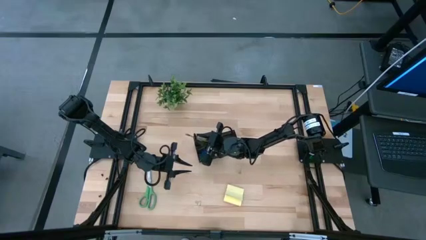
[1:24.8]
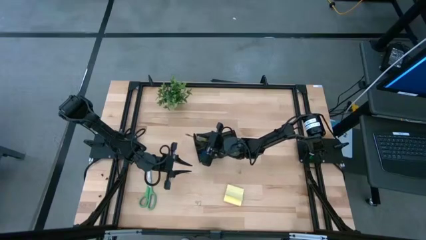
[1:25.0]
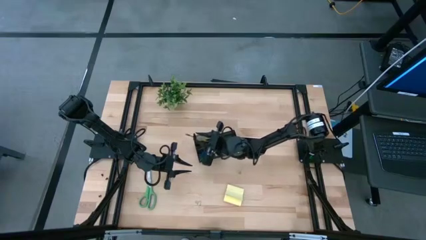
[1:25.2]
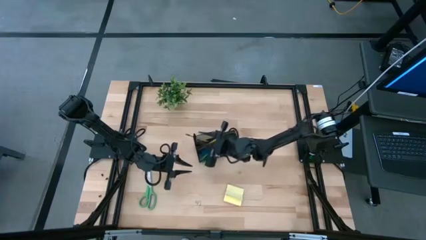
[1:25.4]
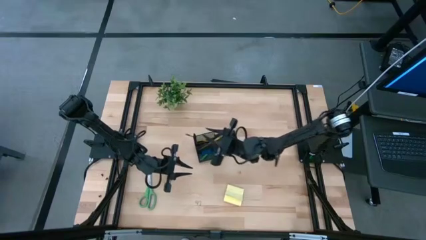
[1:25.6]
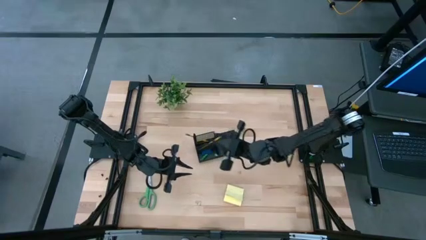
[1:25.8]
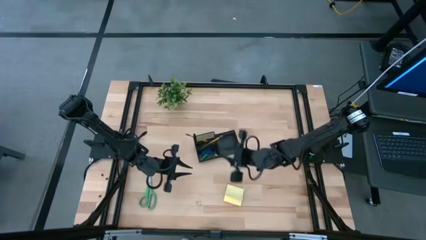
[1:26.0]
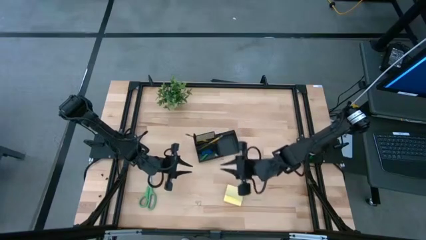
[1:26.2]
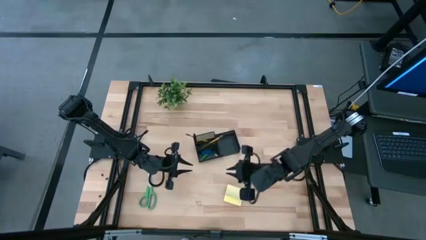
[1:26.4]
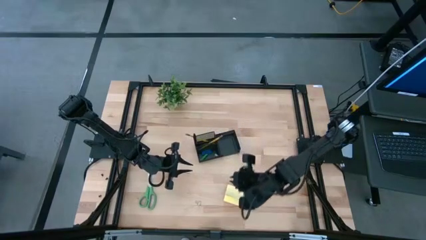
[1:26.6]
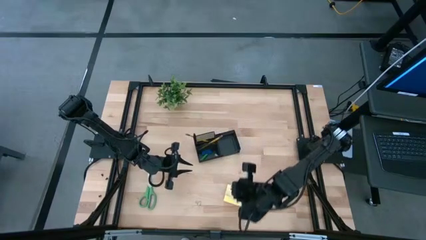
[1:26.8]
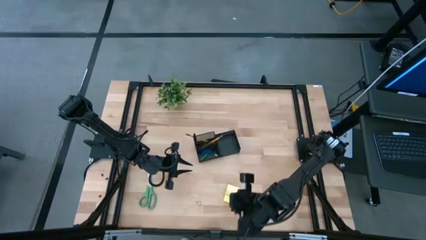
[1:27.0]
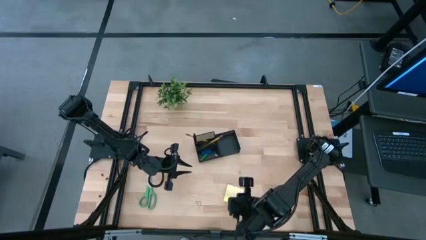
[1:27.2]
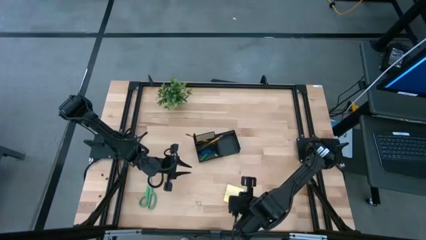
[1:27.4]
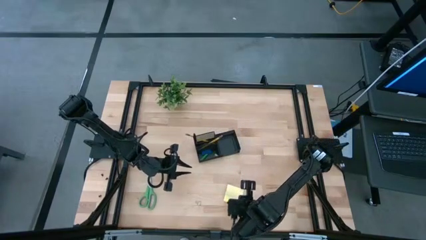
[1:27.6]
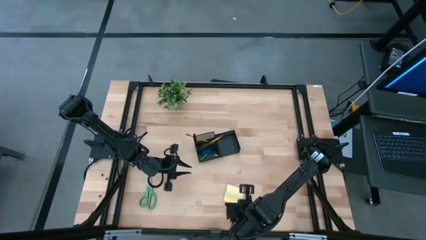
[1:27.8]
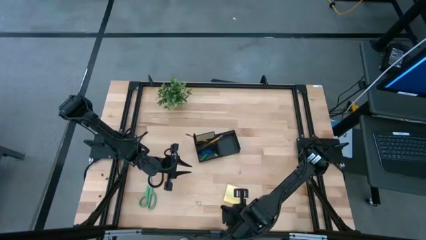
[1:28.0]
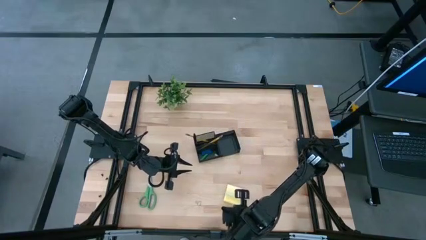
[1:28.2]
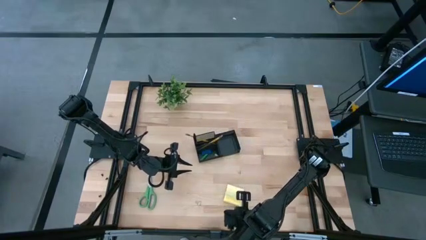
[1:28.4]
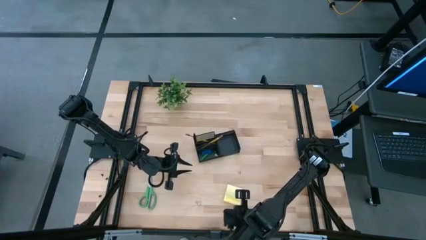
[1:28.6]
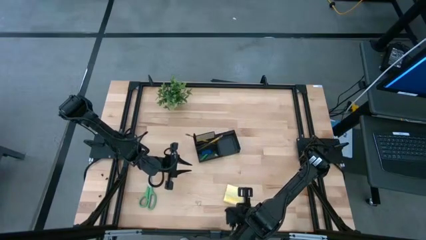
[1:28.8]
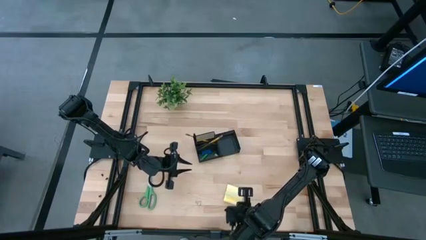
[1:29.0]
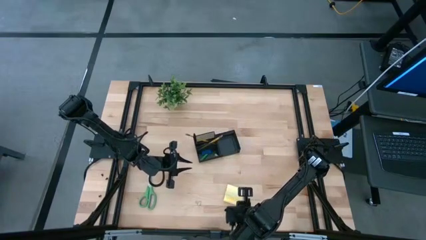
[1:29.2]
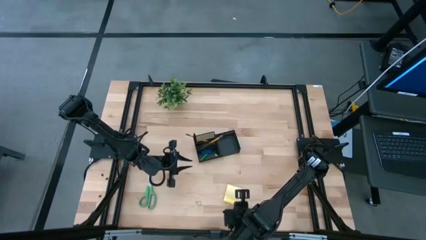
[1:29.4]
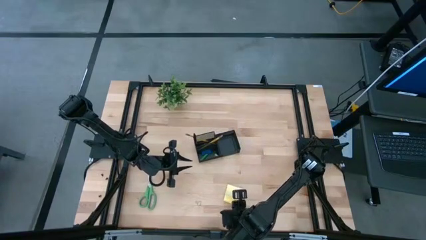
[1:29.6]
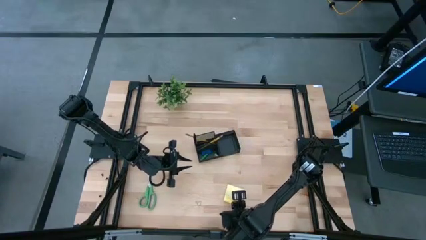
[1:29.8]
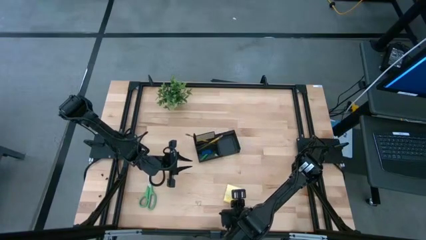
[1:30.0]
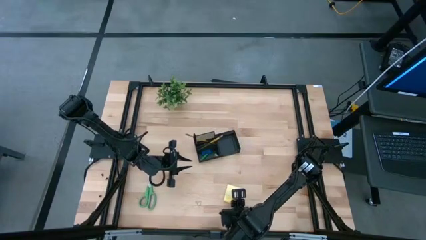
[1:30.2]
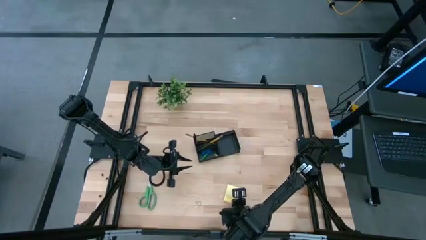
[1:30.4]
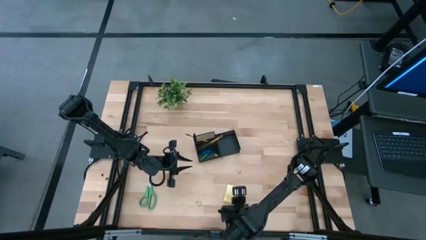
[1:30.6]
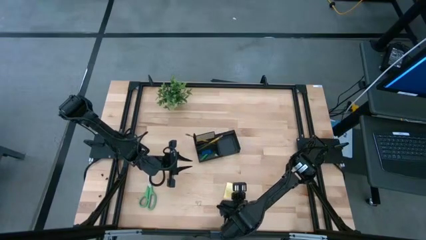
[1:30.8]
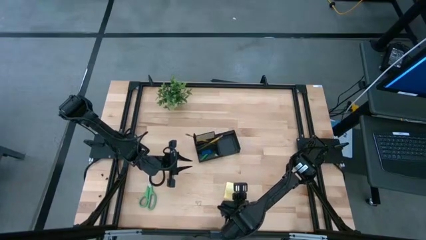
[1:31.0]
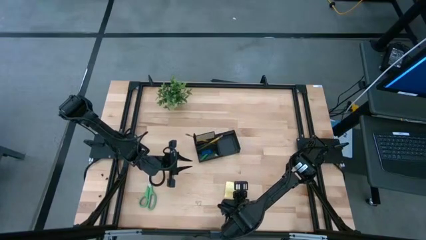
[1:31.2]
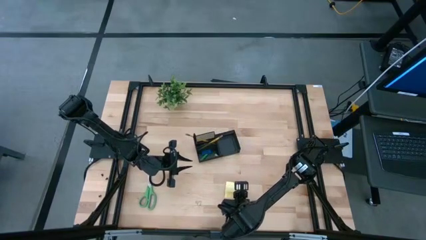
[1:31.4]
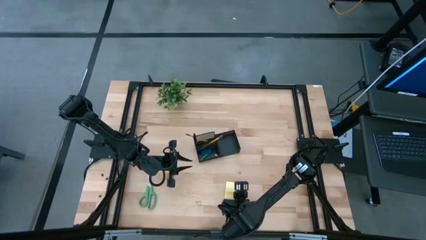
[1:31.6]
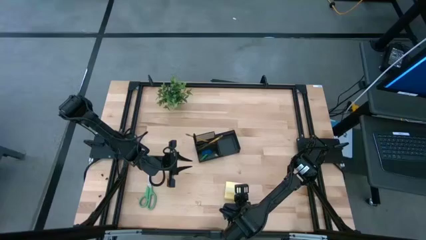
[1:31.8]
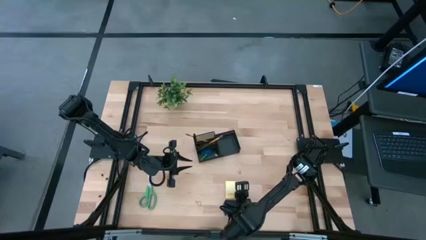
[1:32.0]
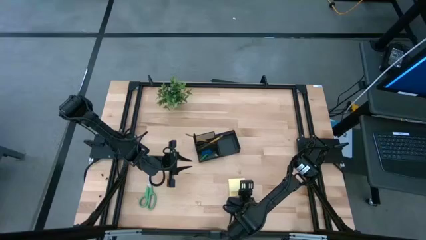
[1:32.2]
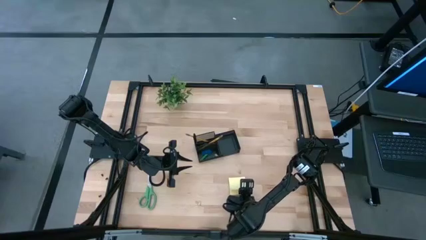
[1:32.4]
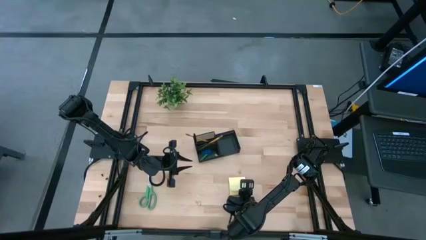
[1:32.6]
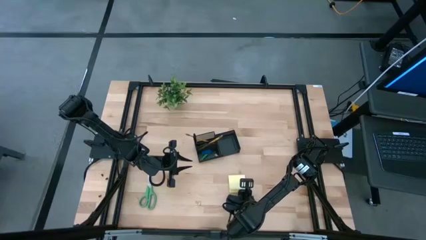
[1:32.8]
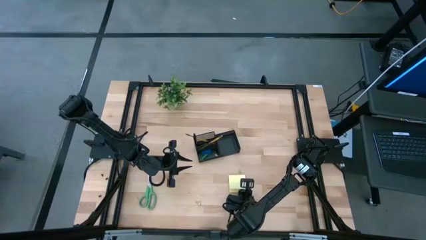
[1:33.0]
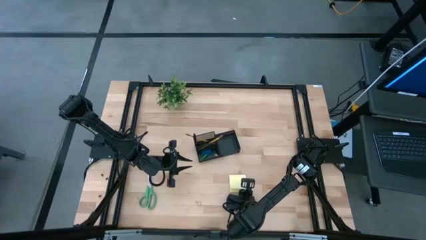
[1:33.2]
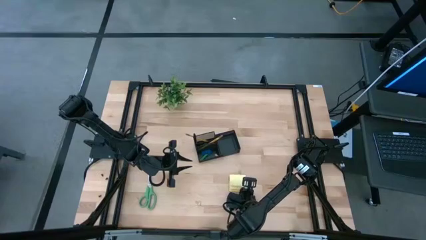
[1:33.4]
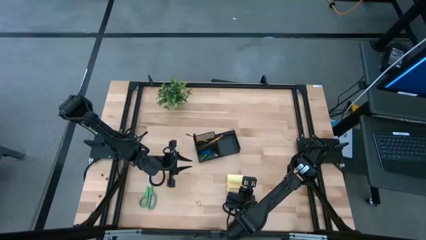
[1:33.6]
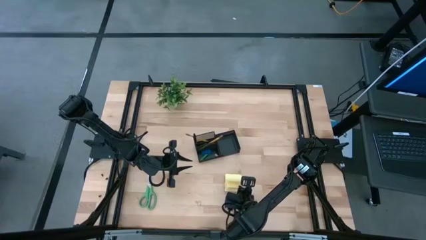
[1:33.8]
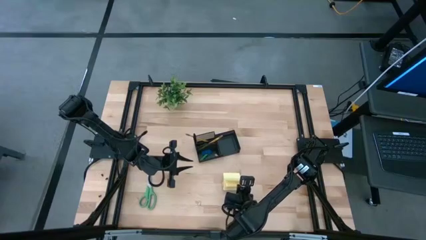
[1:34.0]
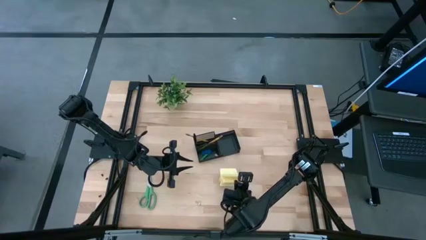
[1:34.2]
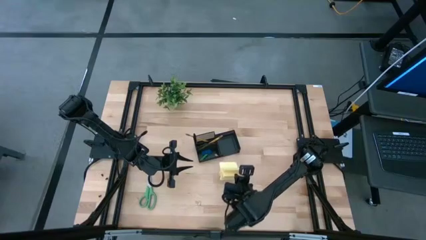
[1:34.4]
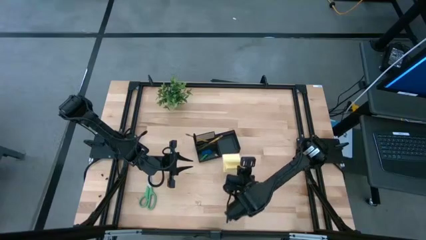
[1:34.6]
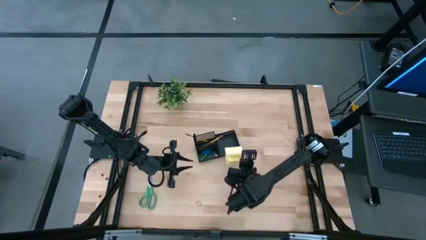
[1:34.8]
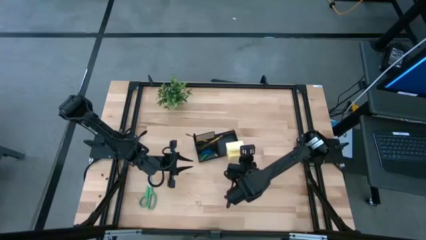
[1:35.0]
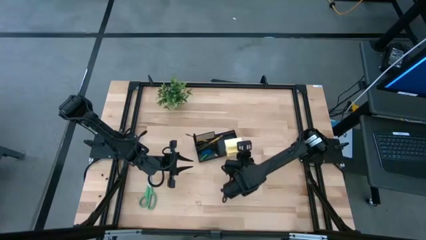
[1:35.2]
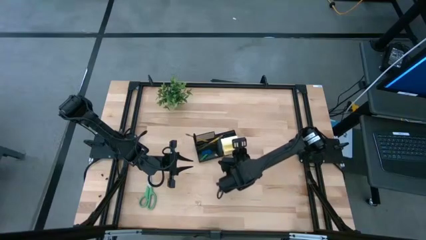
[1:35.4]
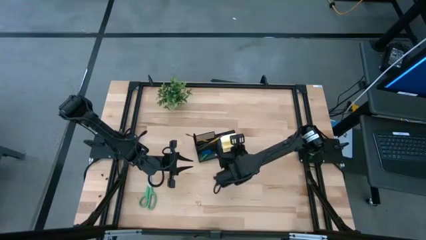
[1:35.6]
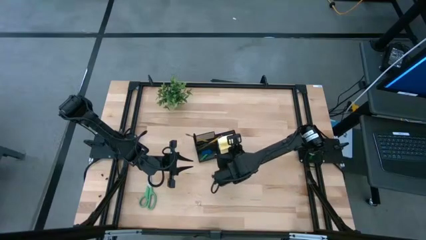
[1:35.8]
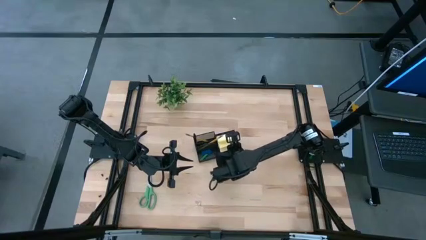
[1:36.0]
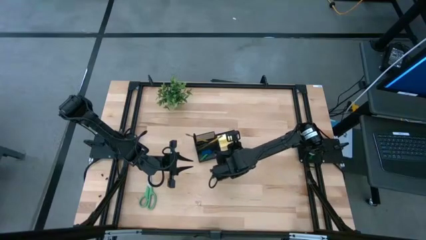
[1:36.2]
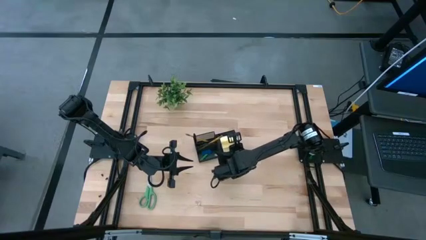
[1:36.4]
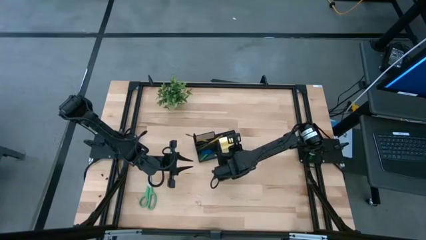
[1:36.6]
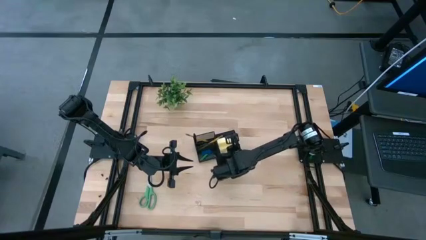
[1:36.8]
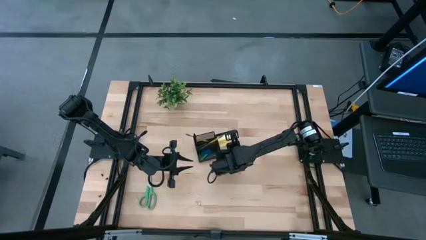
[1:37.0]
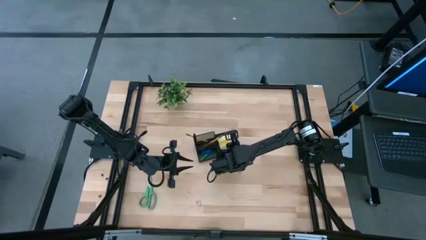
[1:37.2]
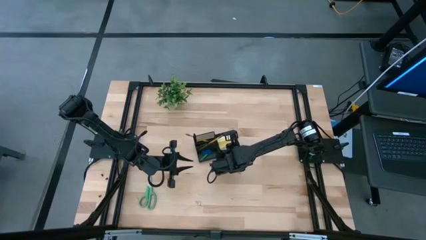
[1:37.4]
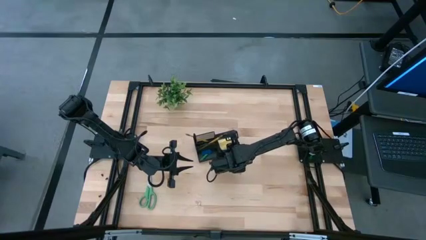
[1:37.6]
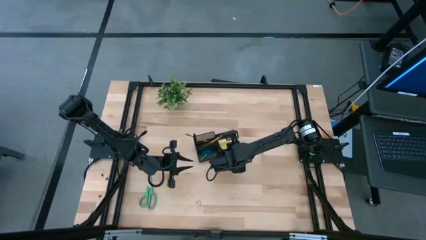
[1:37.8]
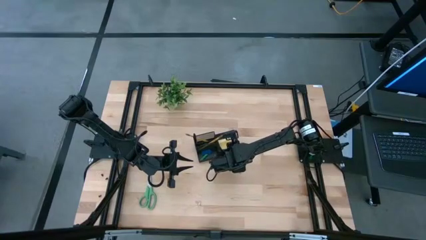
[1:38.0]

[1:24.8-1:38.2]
Task: Pick and place office supplies into organizer
Put the yellow sticky notes into the black desk organizer

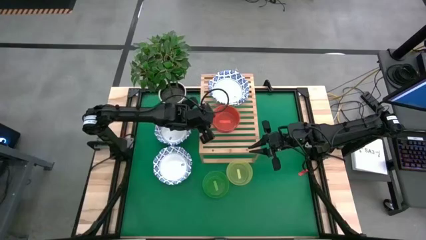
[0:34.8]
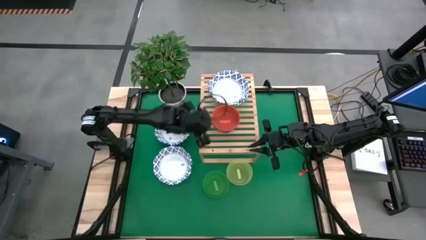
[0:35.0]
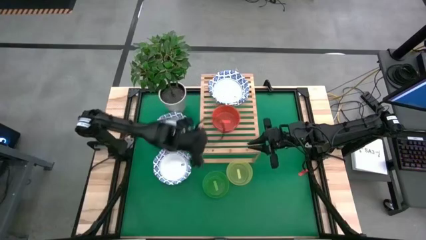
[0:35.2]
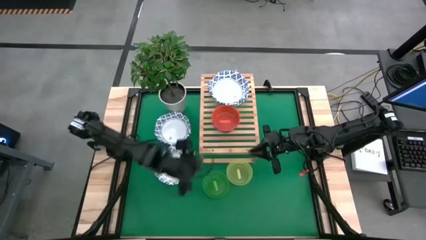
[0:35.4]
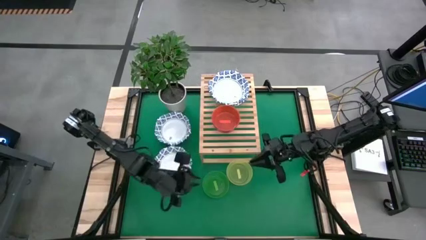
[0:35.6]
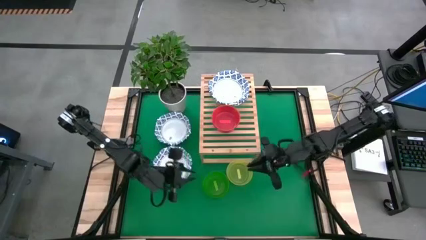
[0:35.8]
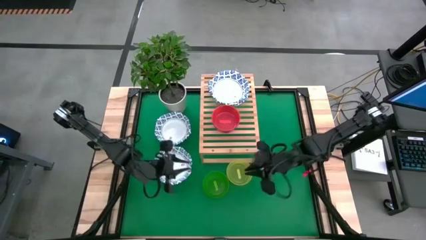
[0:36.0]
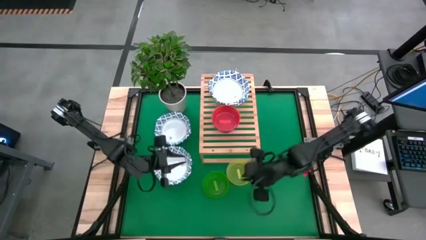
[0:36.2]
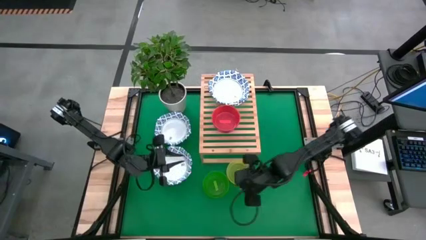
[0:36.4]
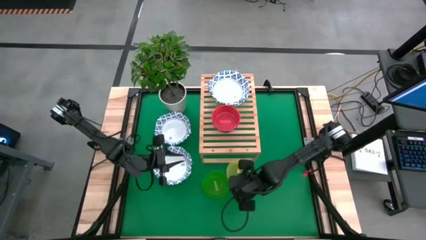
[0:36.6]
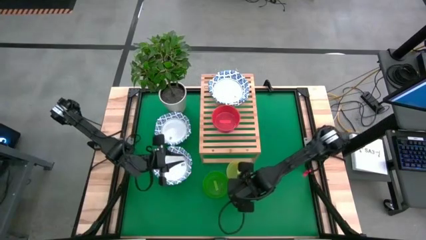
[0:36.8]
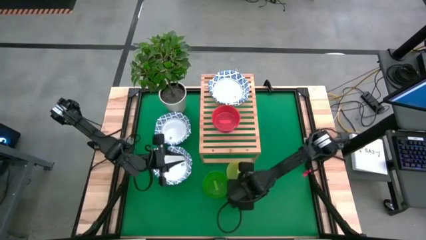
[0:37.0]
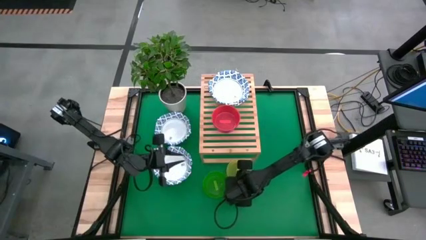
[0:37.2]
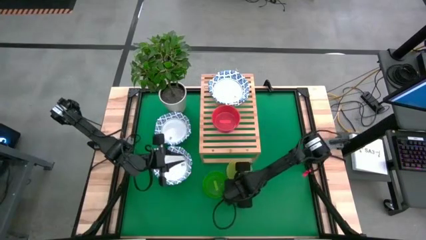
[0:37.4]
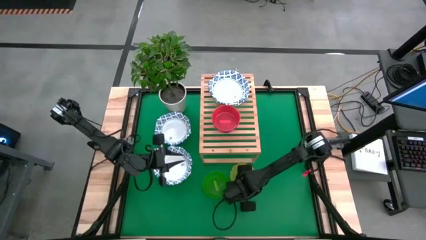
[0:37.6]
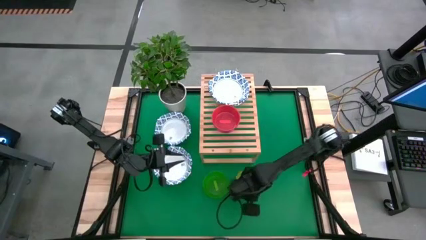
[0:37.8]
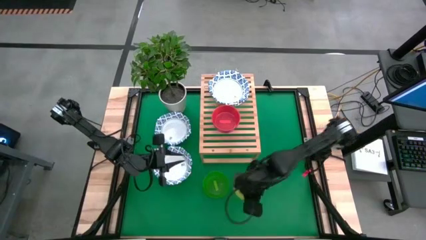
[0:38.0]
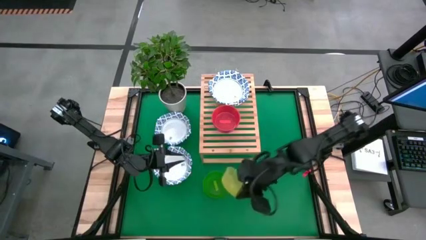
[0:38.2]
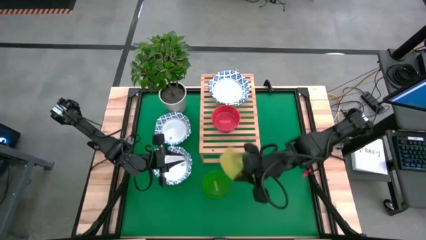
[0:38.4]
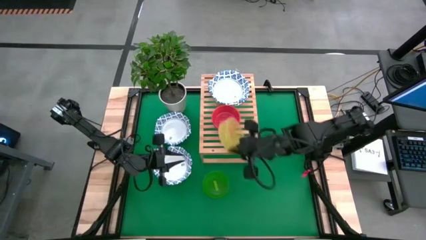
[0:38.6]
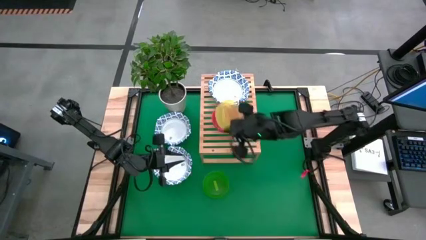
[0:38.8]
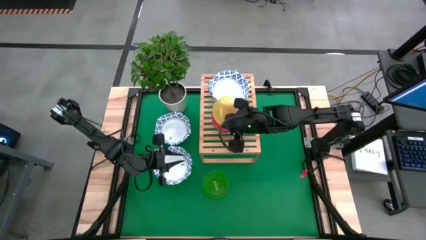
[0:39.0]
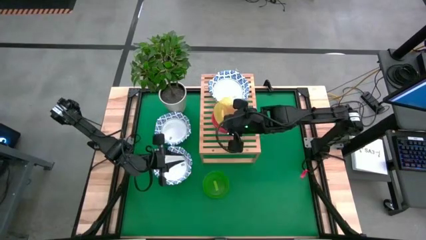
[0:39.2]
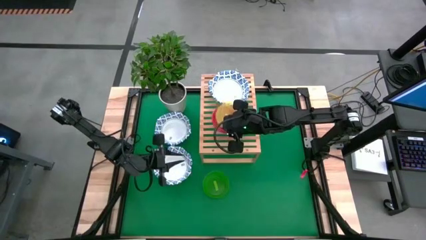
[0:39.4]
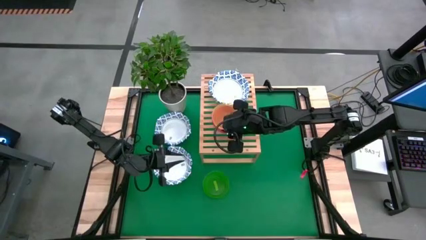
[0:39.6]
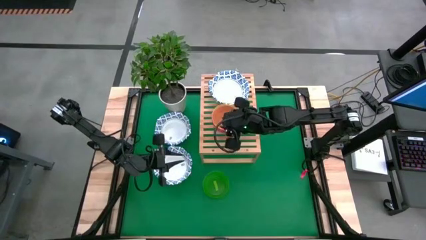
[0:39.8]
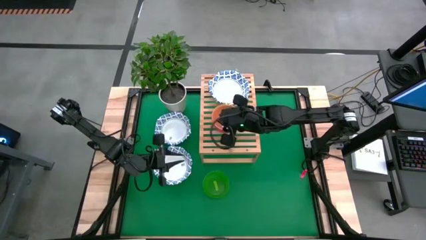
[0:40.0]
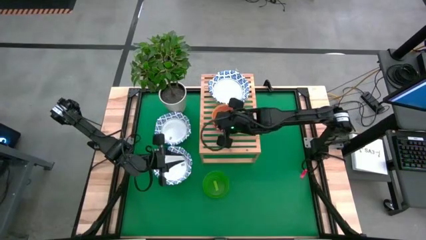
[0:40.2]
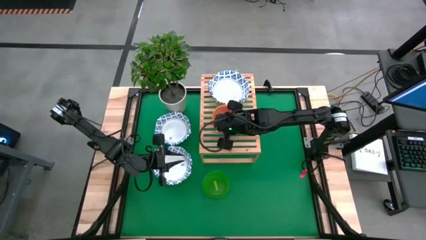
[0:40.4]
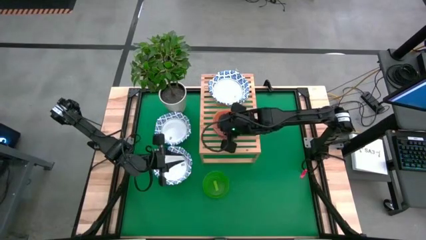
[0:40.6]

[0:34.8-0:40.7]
Task: Place and stack bowls onto a shelf
Stack the yellow bowl on top of the red bowl on the shelf
